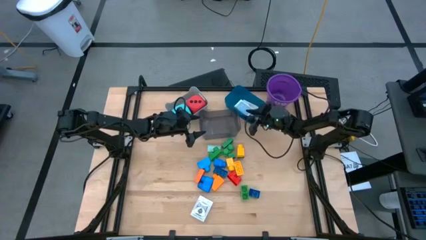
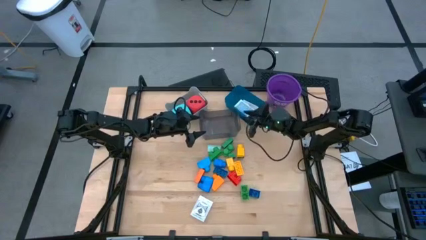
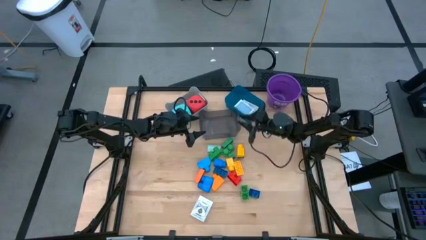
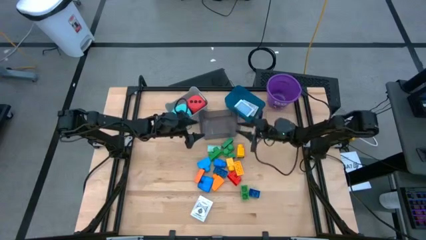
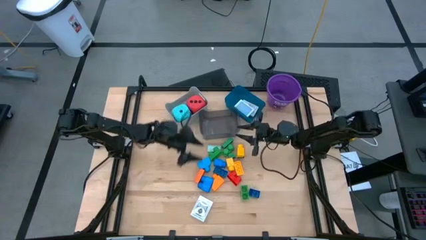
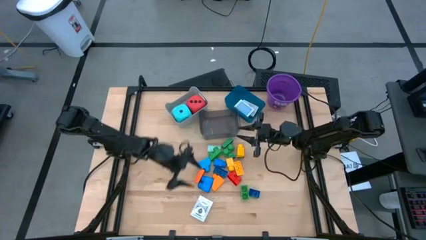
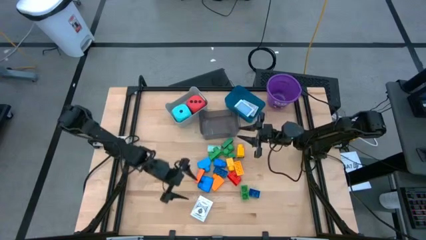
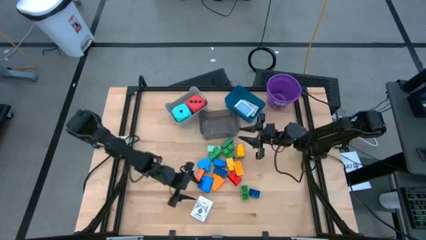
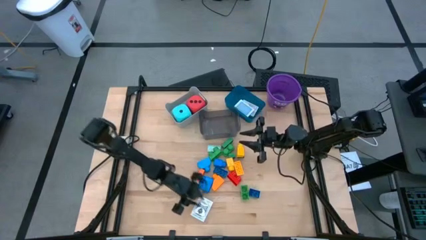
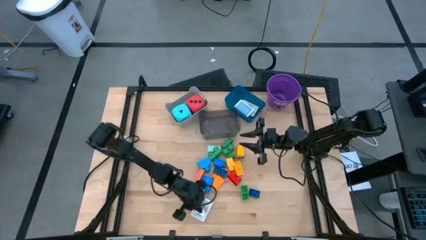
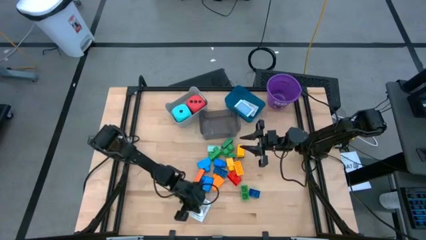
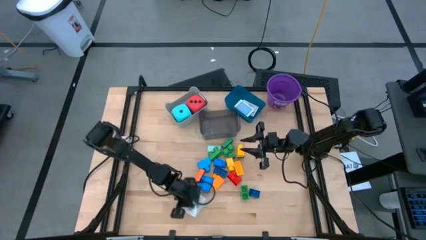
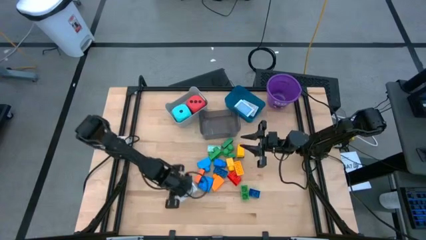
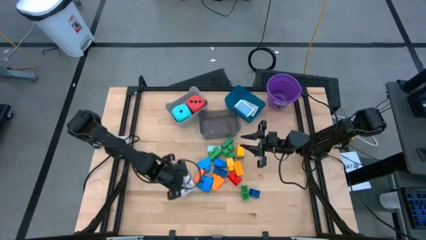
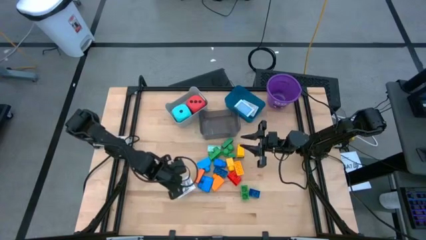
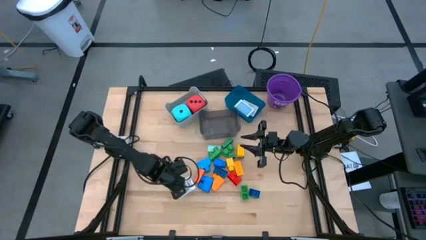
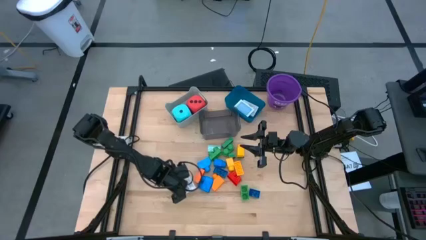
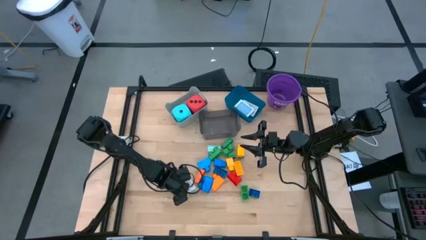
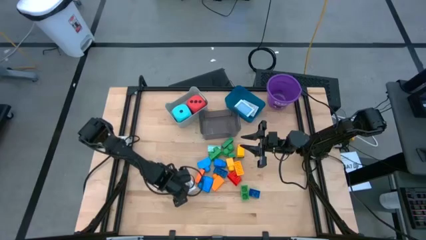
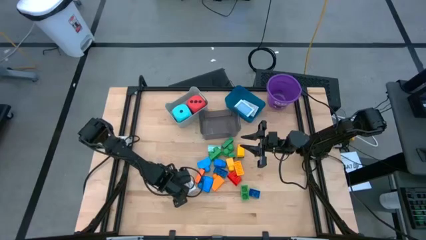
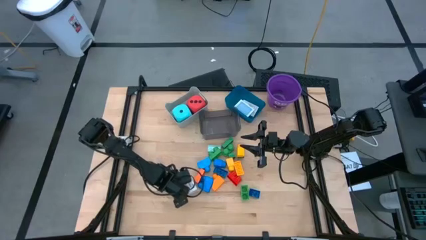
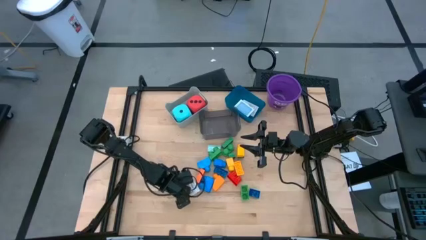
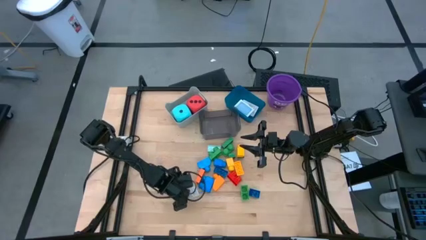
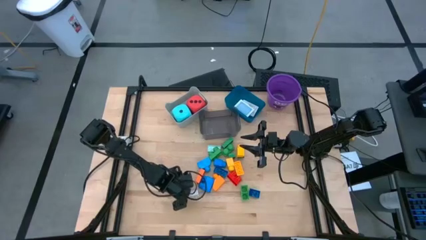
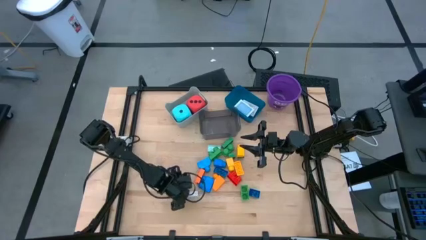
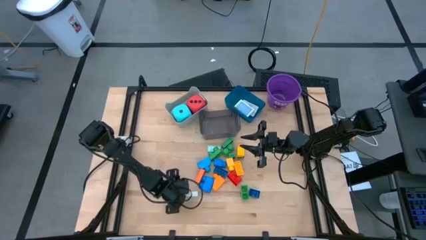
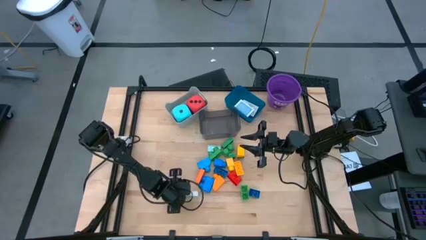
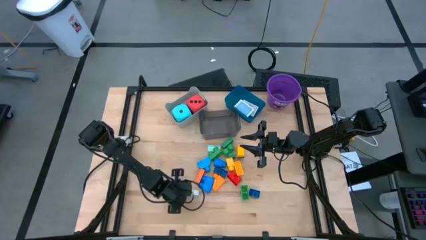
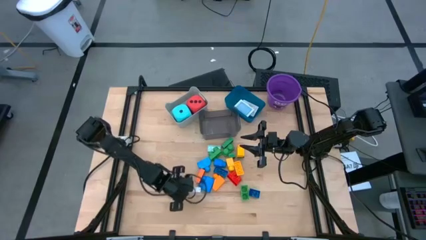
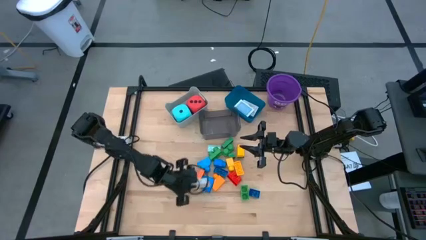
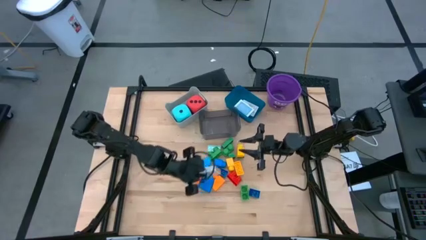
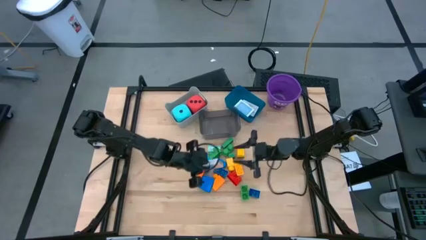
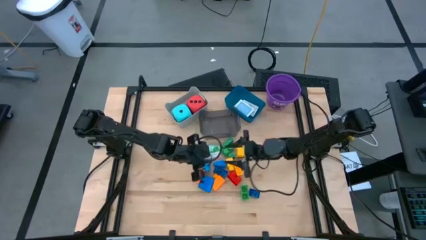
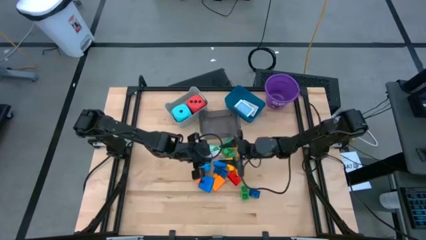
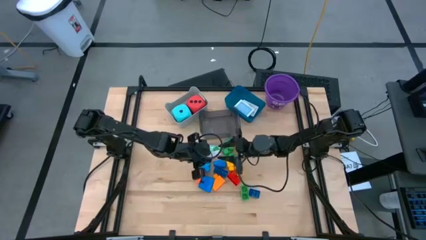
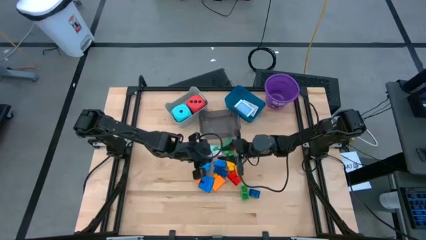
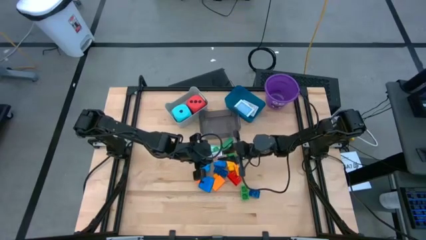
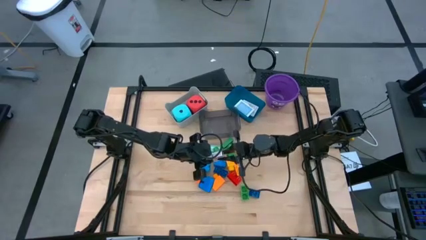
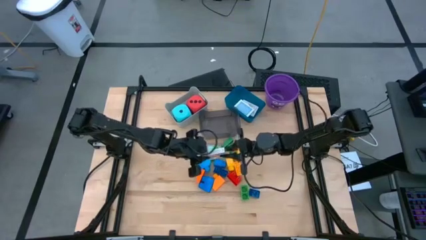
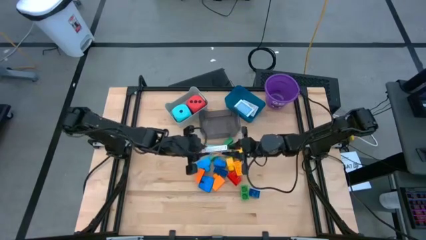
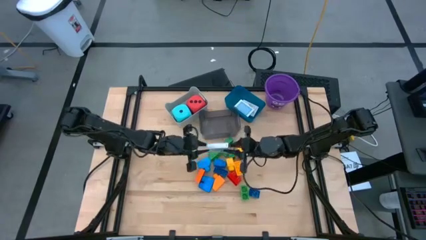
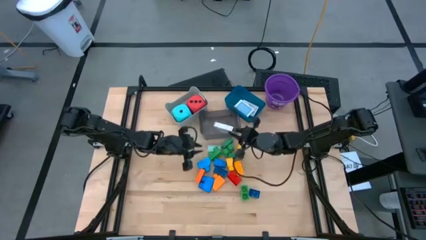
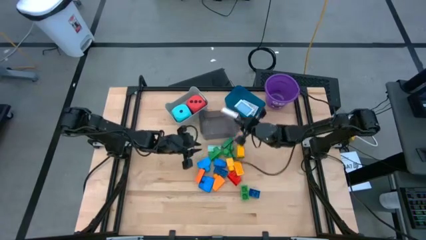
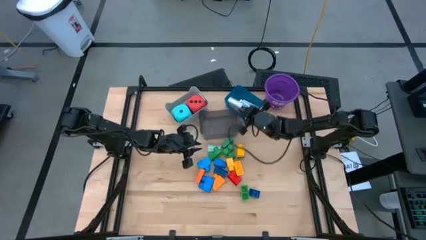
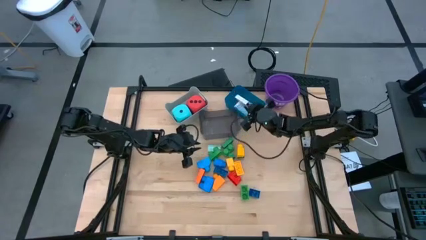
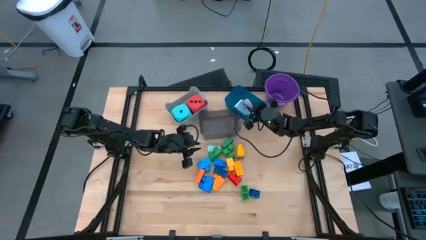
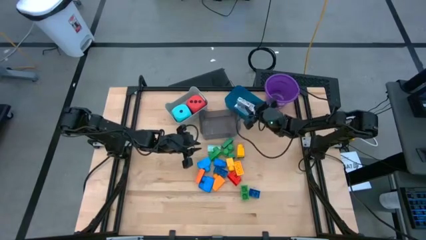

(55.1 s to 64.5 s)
Task: Pick & Place Toys
Put the black playing card box into the blue bin

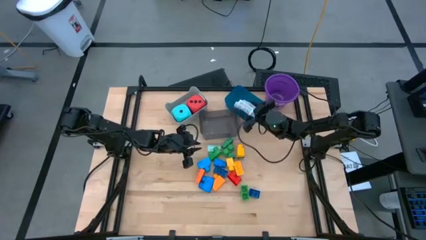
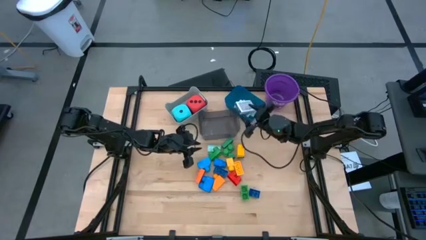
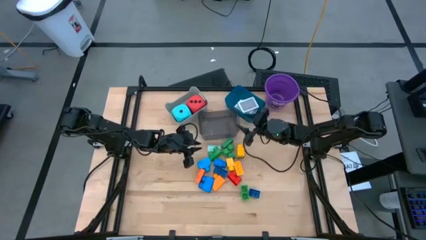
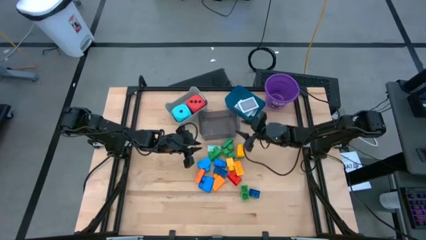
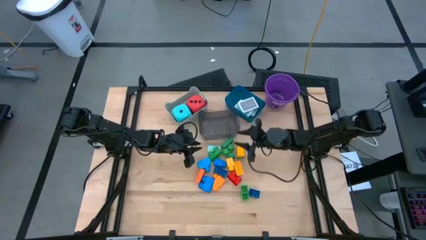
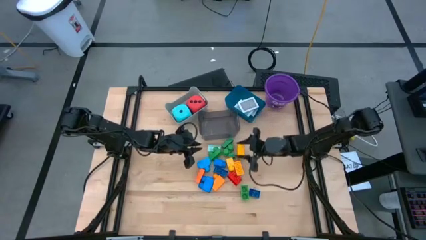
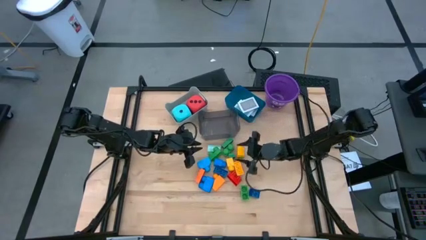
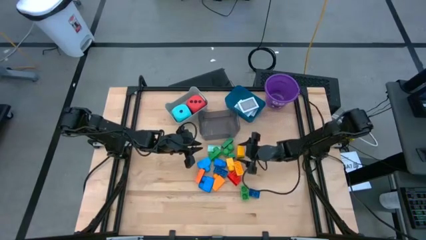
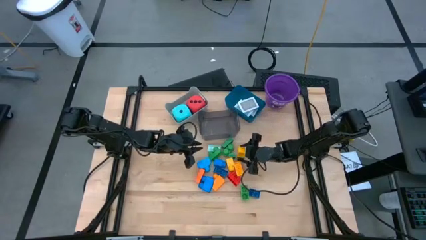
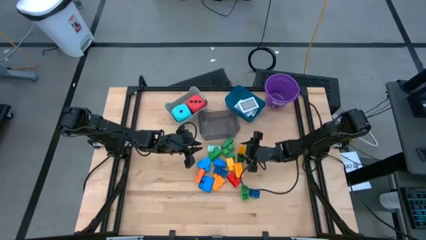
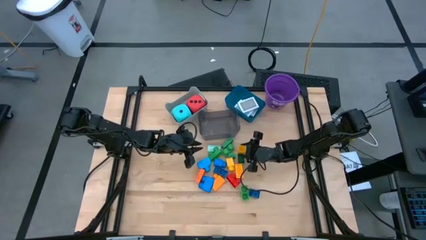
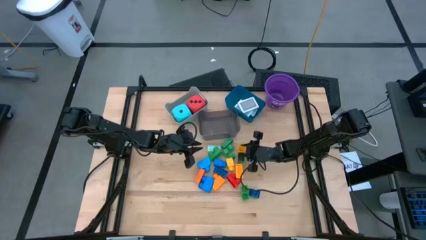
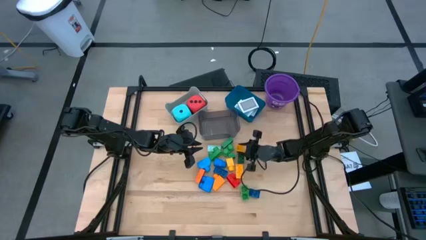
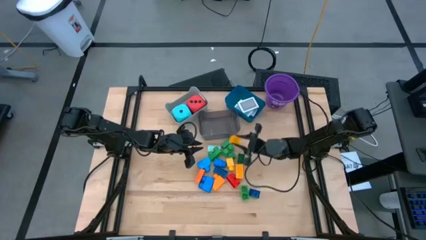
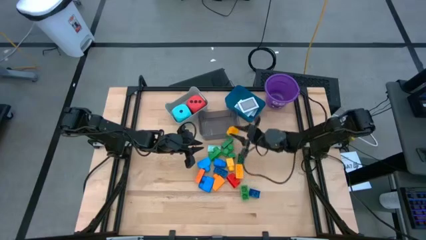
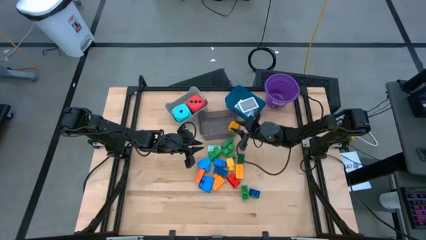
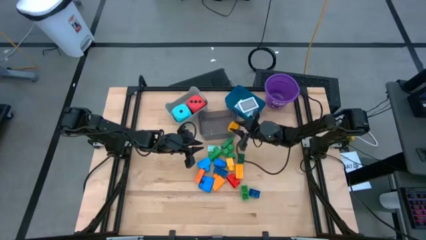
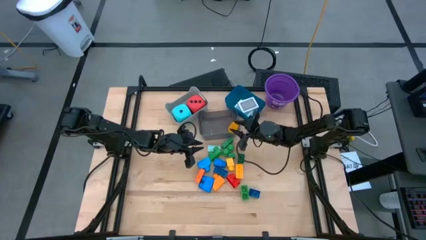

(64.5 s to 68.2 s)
Put the yellow block into the black bin

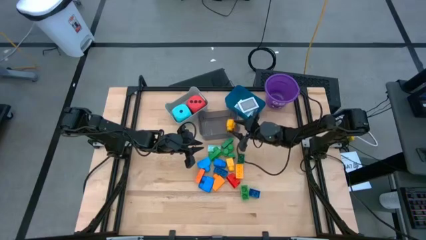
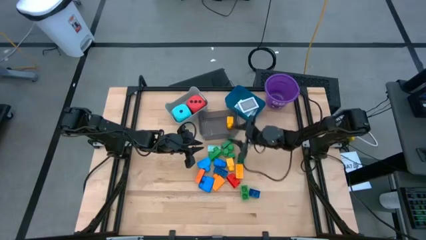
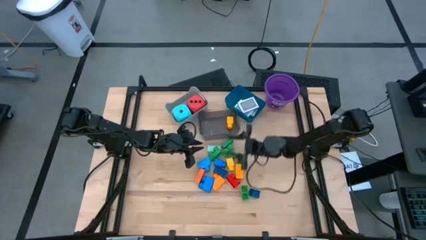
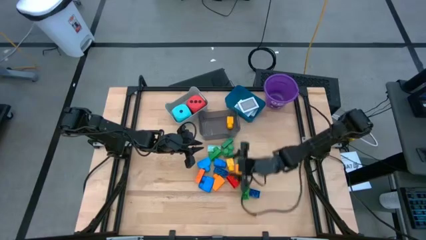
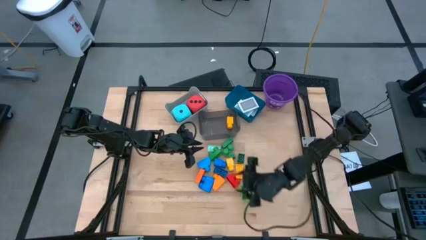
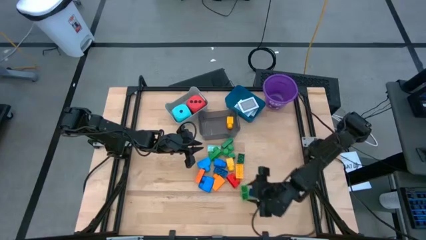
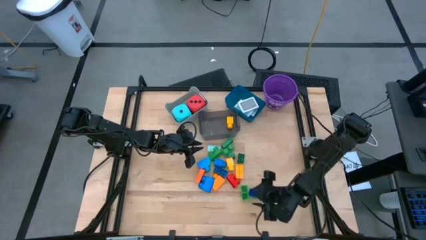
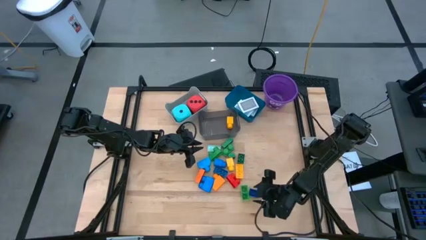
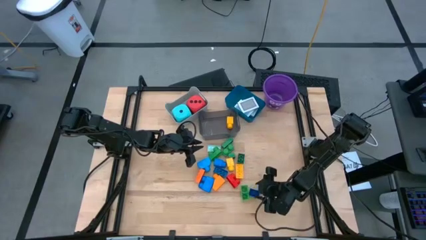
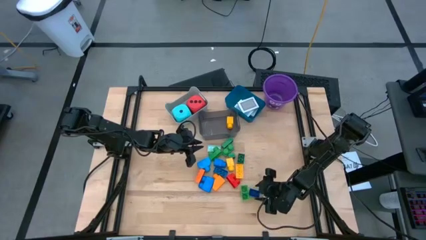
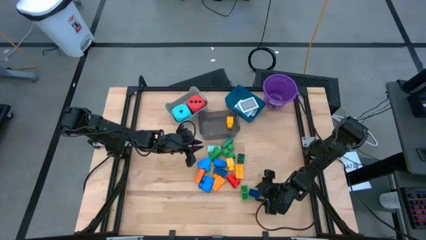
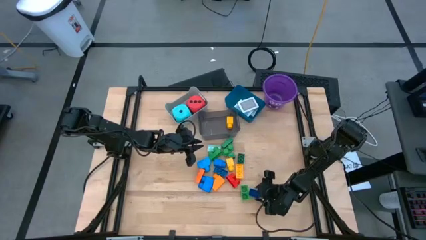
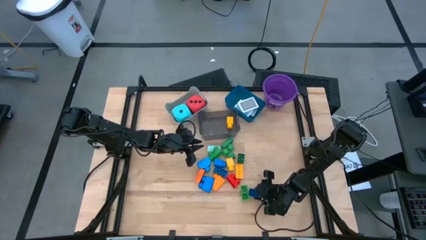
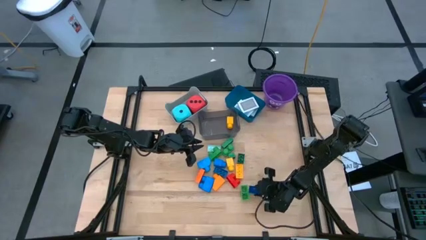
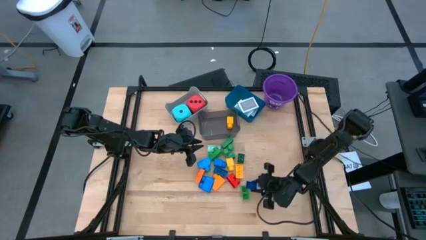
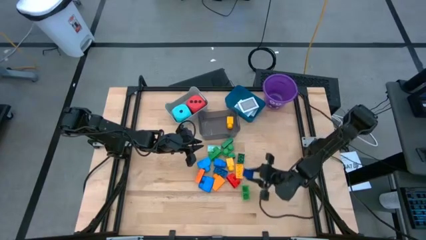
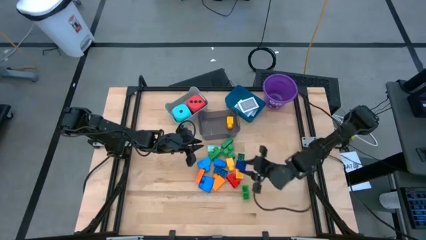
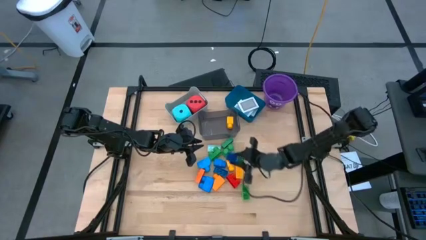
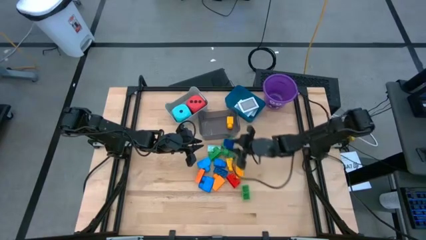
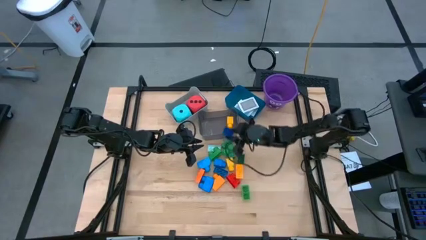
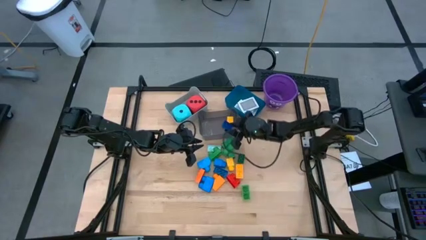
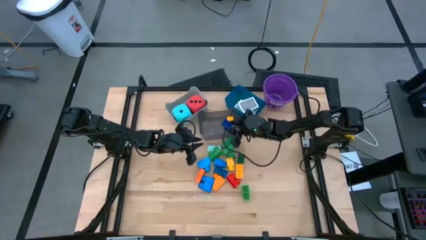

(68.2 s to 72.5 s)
Put the dark blue block into the black bin

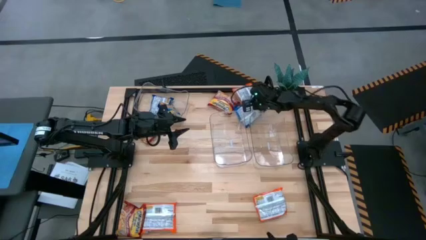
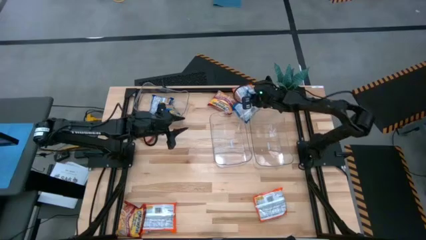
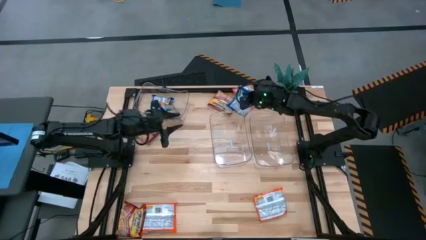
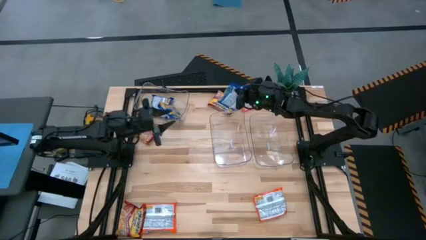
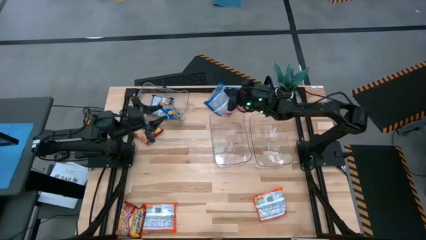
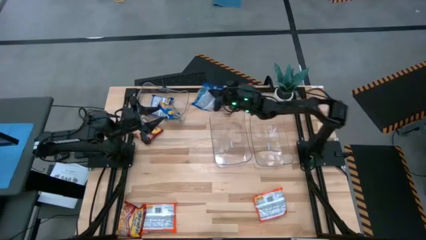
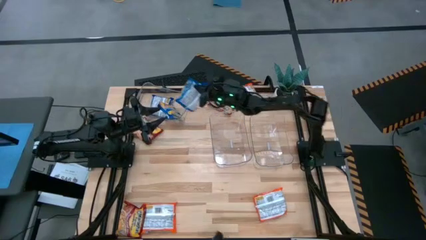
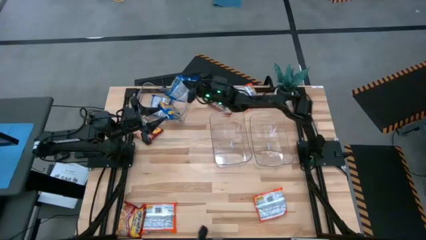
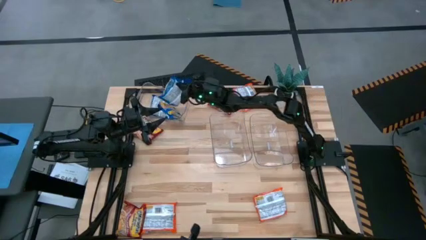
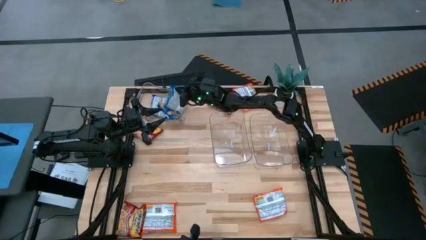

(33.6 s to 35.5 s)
Task: Sort Maruchan noodles
Put the blue noodle pack into the top left transparent bin
